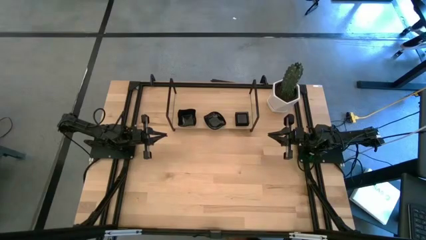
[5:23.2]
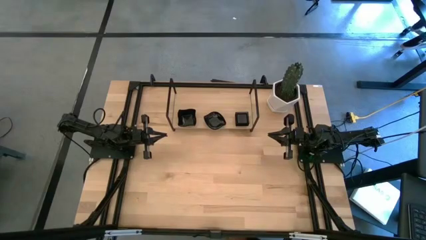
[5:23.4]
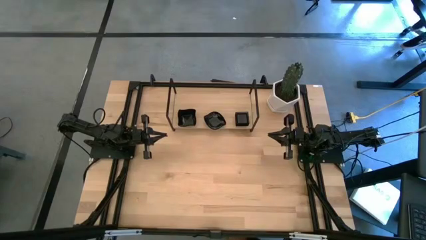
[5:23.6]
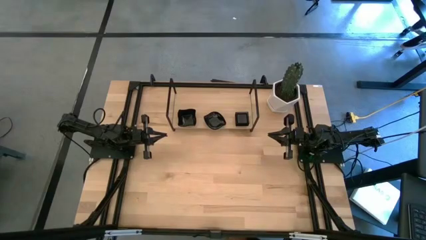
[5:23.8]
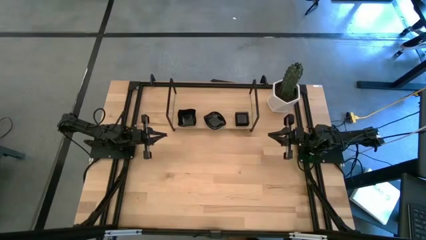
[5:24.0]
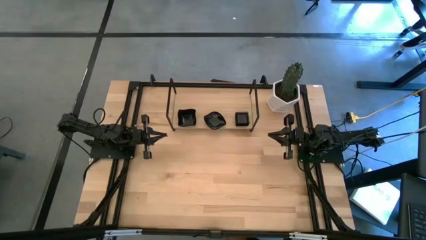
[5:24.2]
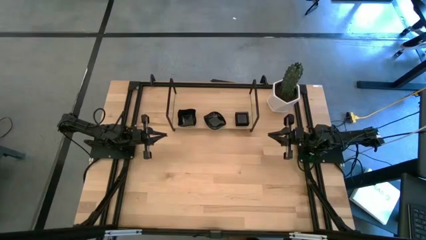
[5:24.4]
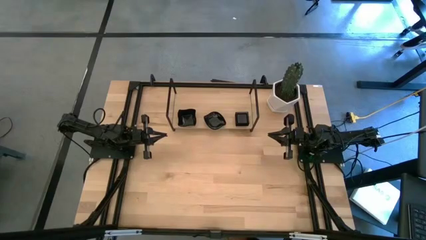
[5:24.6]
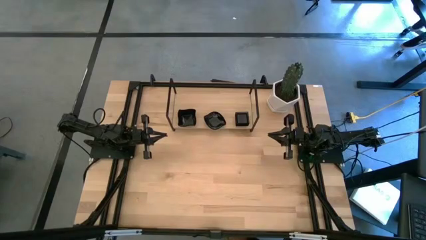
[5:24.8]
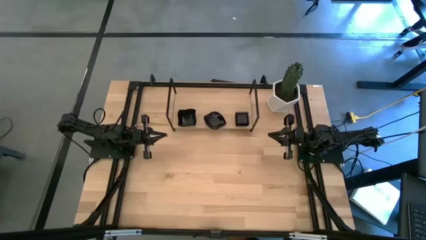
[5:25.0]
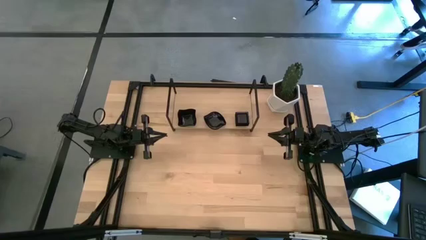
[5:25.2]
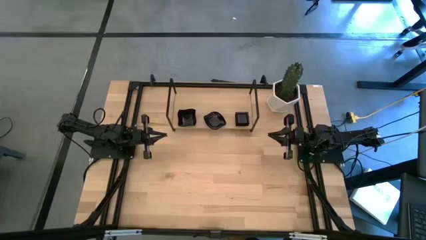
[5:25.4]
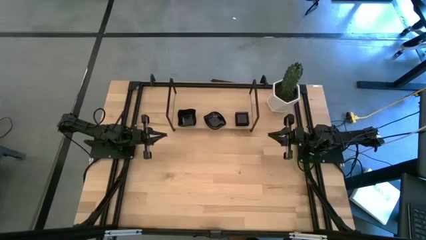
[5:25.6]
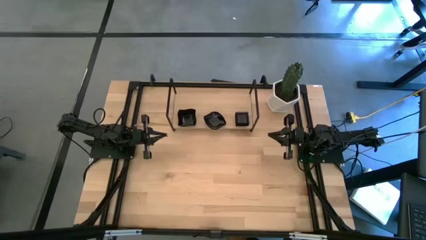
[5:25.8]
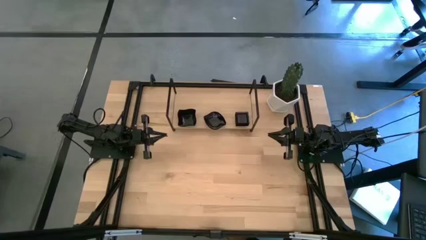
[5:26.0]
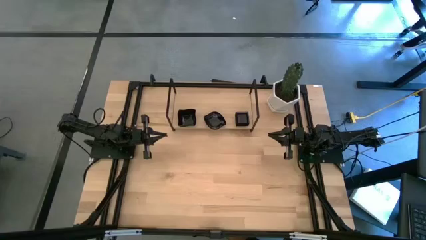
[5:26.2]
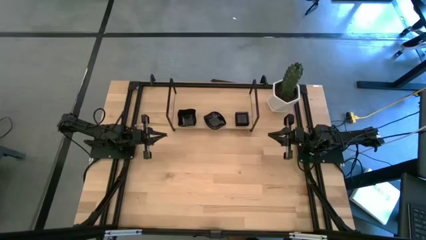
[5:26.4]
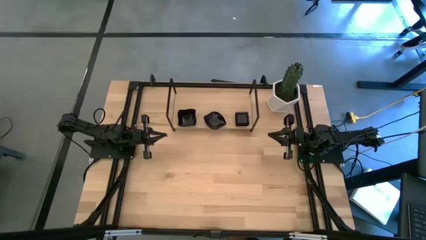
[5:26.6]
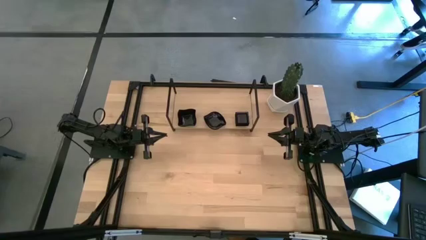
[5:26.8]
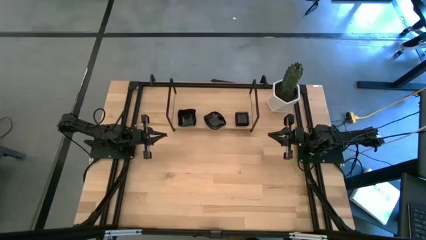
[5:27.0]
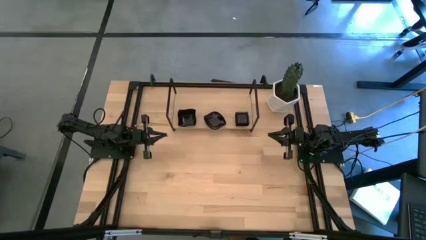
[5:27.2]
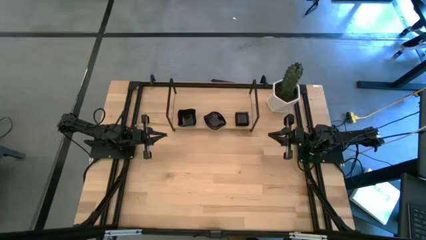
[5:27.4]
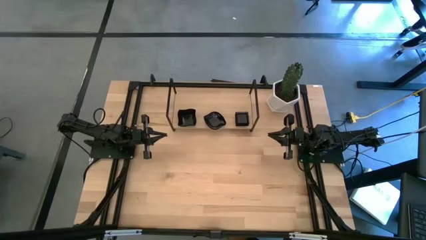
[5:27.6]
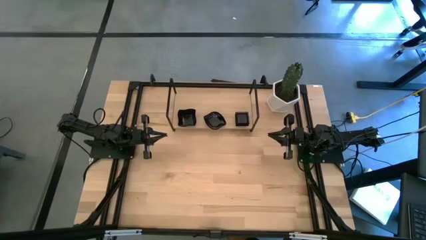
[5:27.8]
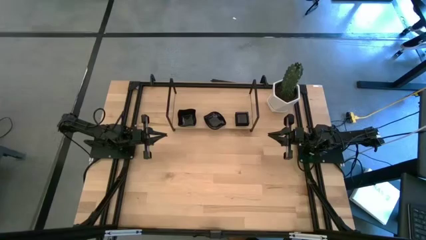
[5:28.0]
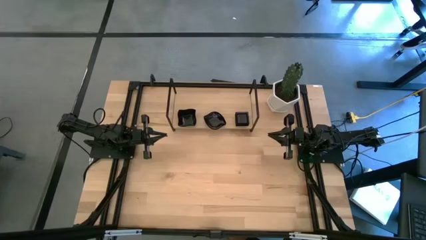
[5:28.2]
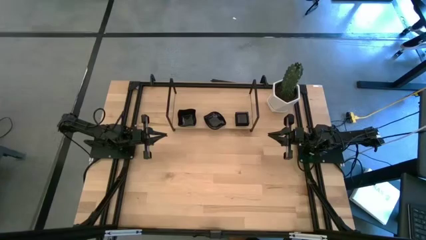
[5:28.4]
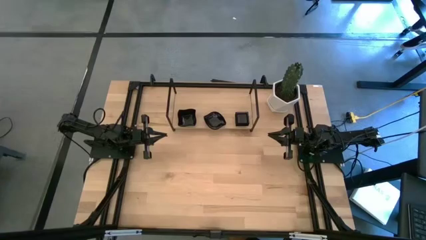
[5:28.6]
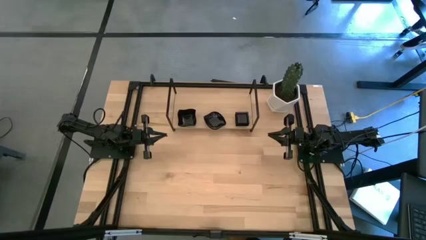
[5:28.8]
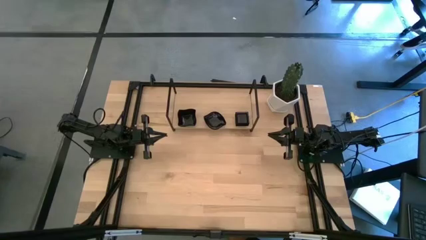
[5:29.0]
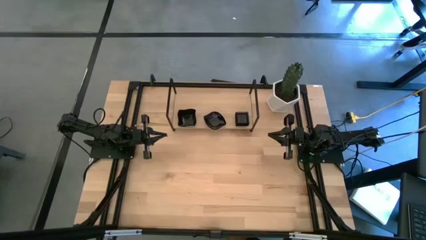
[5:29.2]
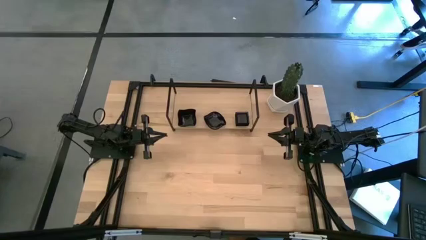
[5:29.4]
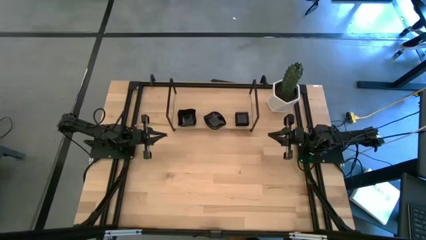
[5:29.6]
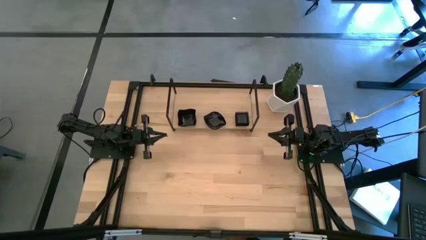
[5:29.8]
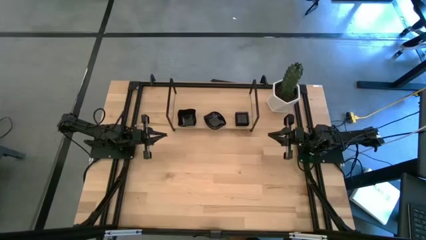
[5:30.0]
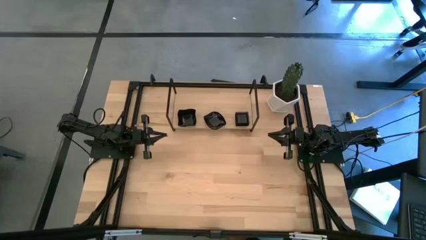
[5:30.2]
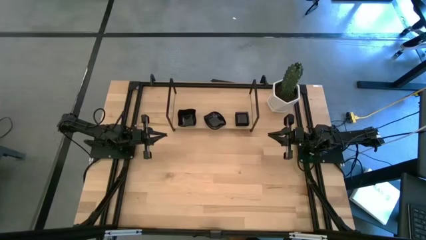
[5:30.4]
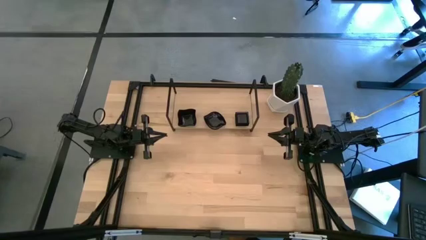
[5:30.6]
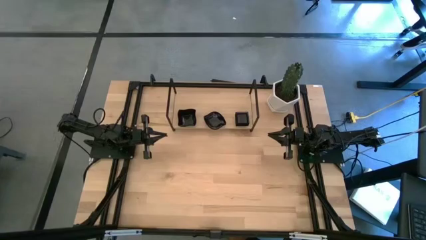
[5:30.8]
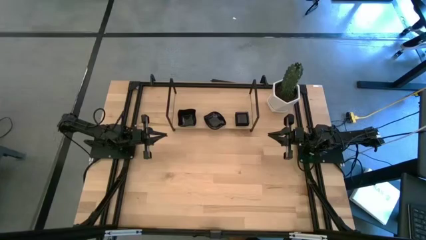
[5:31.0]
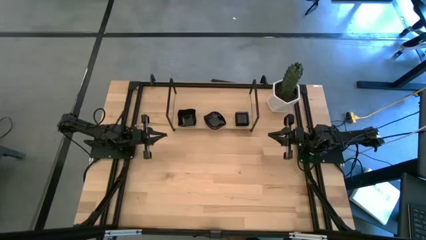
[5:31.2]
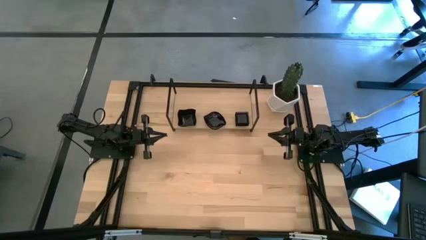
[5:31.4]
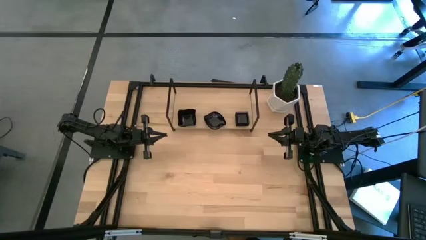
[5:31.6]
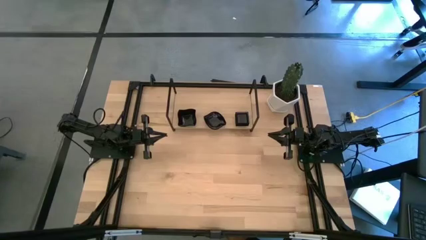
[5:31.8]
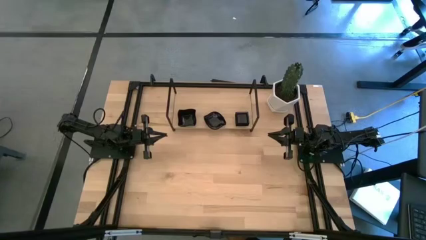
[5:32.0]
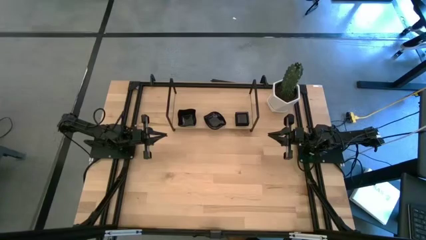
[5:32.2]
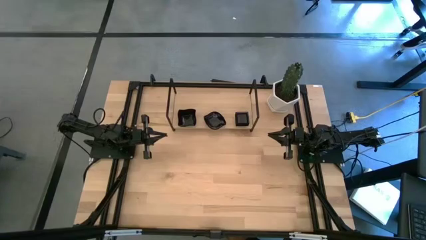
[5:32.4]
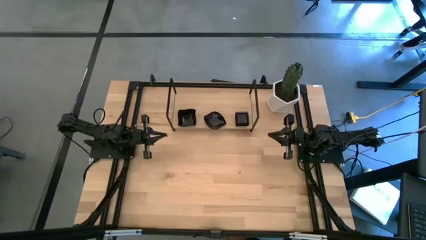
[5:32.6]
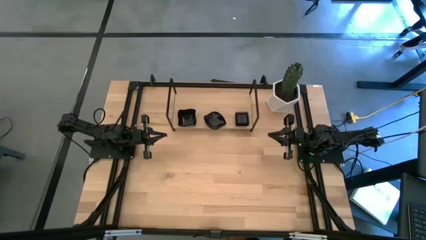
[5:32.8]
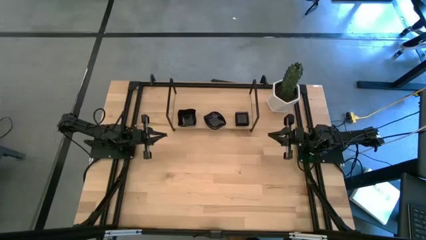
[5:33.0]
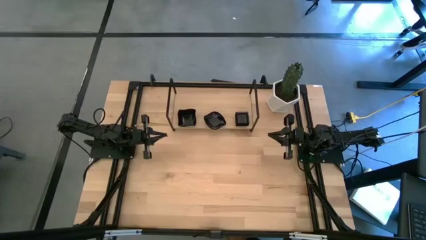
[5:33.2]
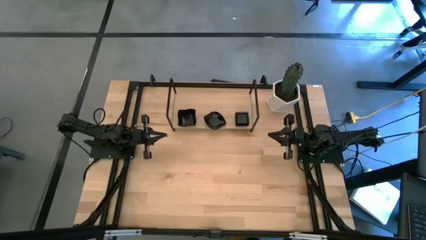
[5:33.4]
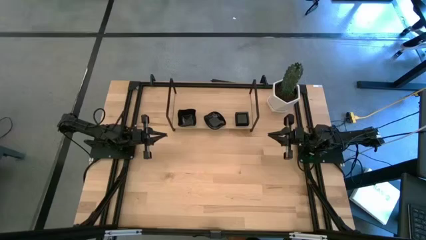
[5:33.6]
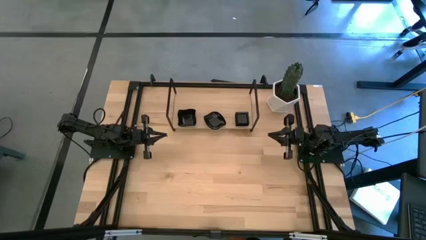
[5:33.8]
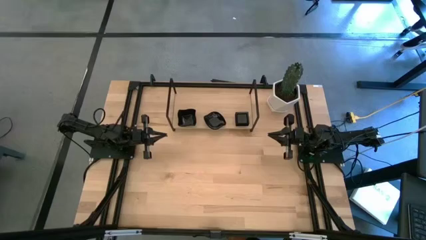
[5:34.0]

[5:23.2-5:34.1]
Task: Pick & Place Mini shaped plates
Return to Home Position

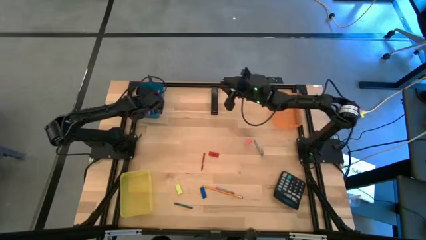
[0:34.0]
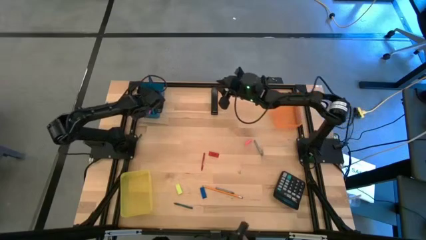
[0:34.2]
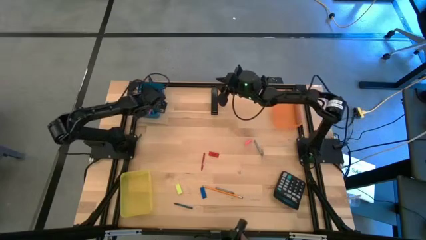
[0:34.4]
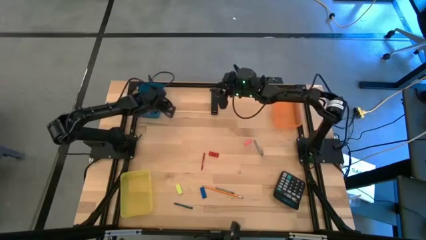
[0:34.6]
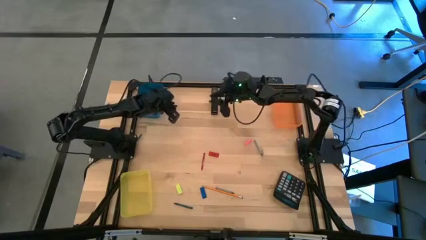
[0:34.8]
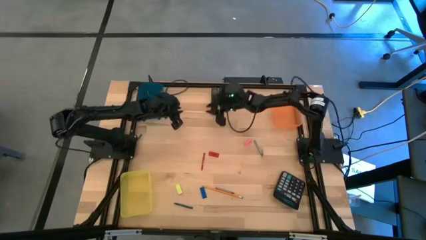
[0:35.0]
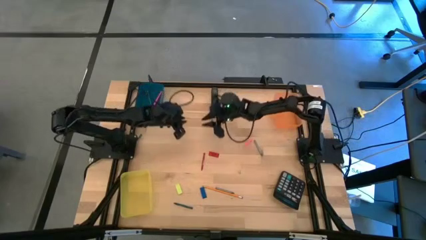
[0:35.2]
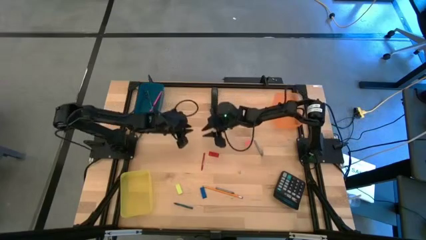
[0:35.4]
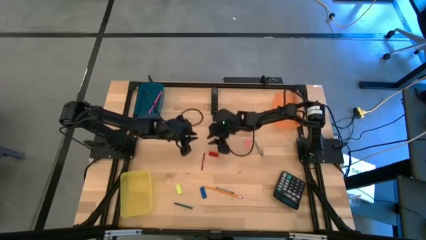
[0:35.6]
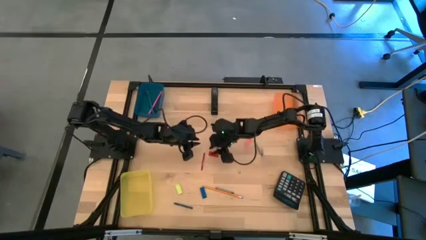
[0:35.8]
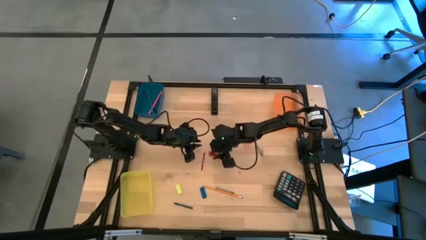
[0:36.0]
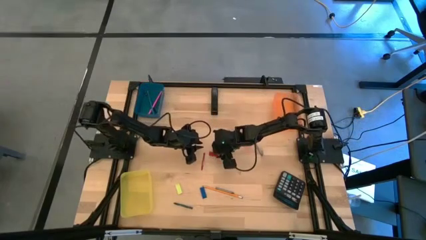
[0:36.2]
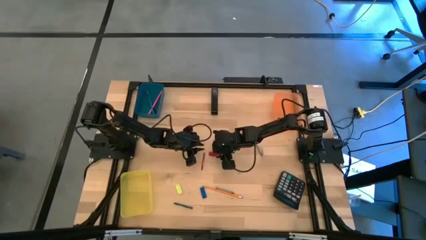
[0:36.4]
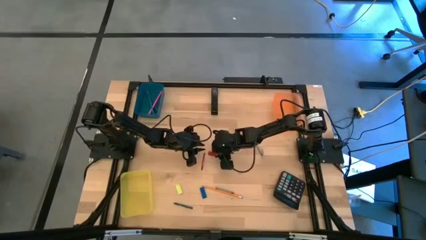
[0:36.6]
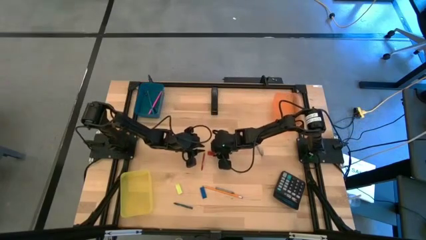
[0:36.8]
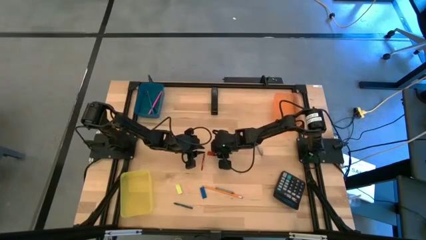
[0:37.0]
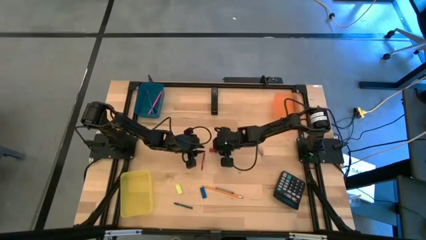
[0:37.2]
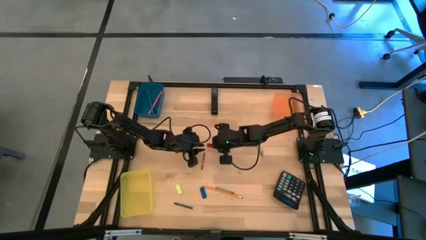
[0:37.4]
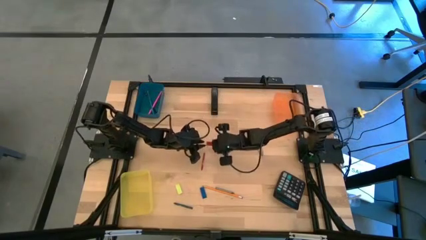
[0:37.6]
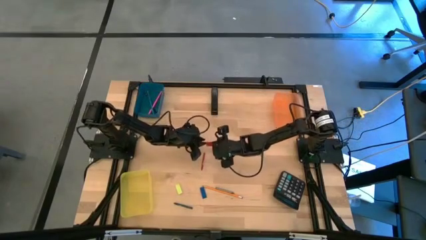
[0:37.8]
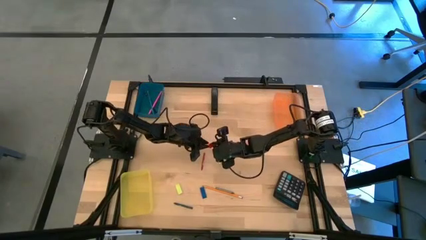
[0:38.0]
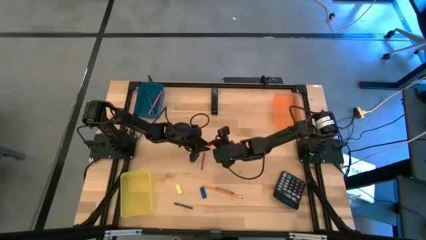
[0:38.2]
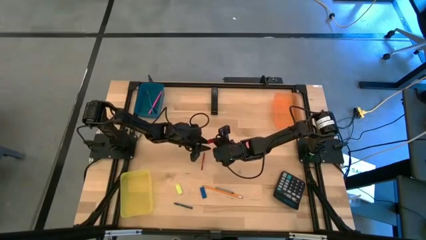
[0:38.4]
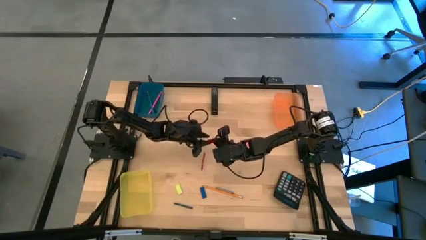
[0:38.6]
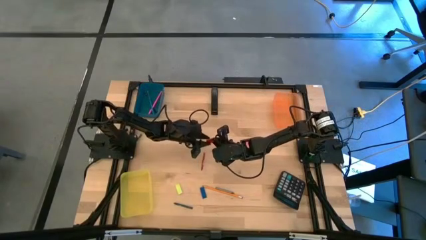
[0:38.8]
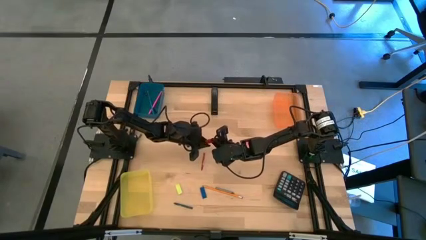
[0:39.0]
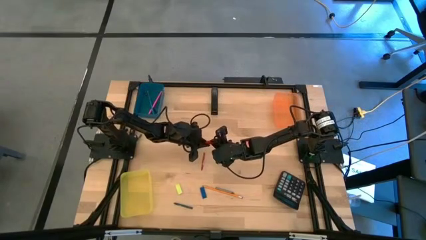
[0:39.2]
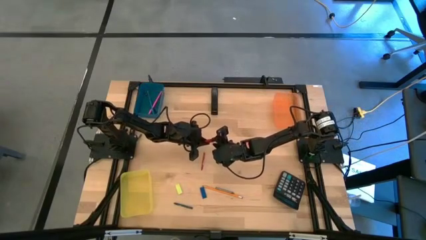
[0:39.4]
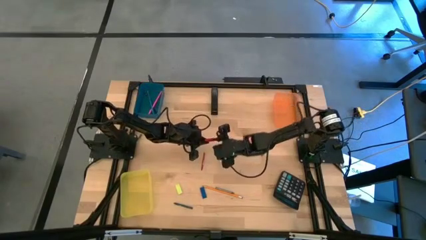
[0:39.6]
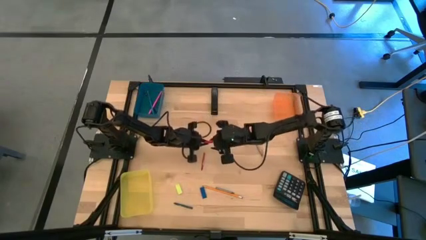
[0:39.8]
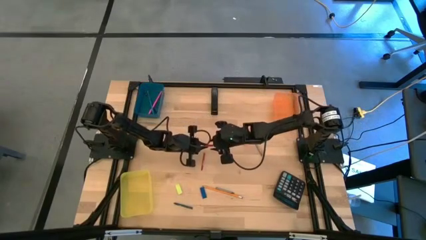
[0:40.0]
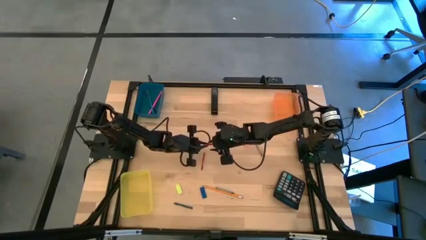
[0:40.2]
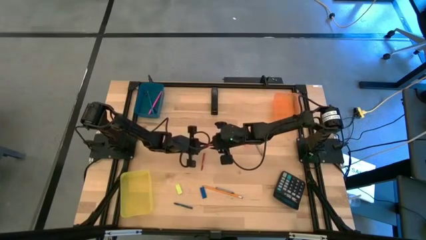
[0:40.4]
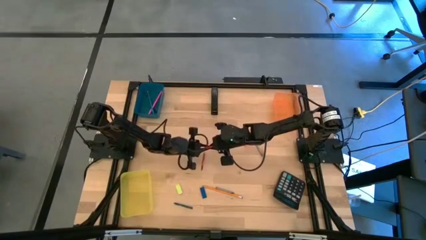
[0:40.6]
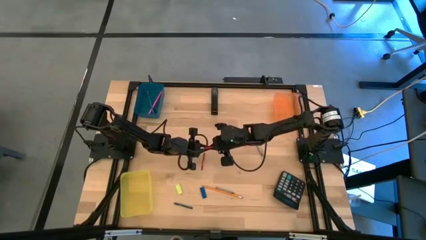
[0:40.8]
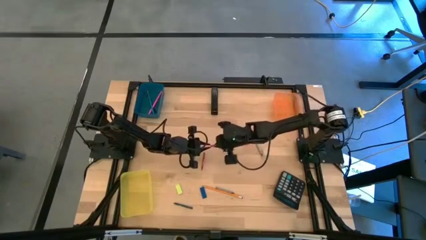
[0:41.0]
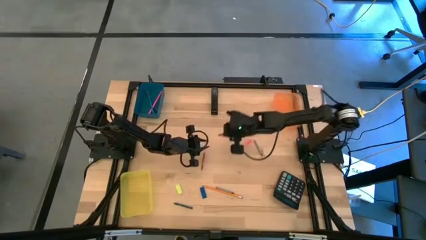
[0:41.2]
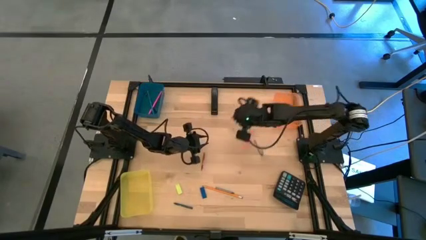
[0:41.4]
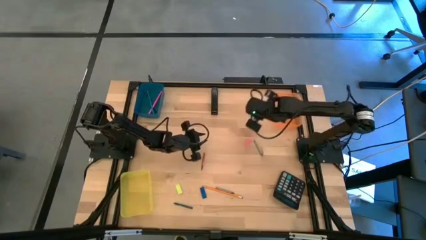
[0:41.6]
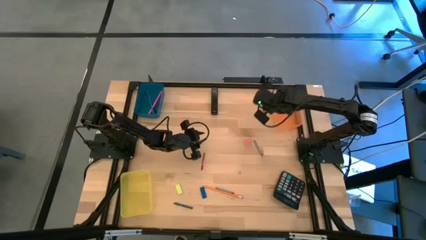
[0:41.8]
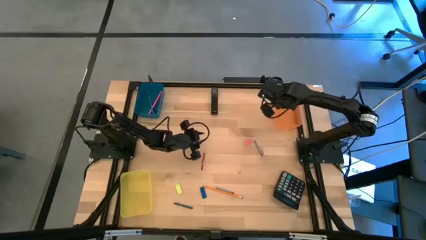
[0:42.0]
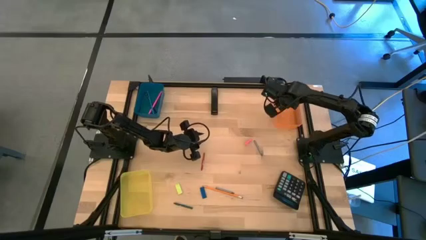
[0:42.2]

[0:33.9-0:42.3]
Task: Sort crayons/erasers/pens/pencils in bins
Put the red eraser into the orange bin
